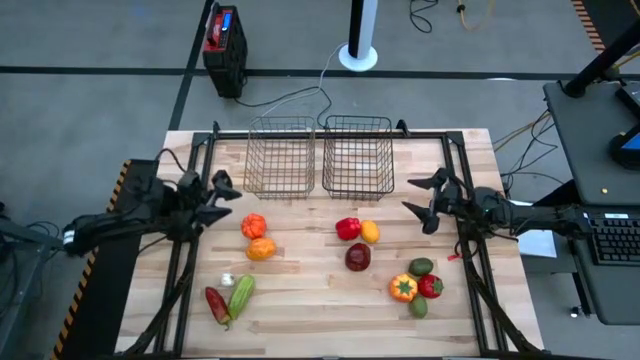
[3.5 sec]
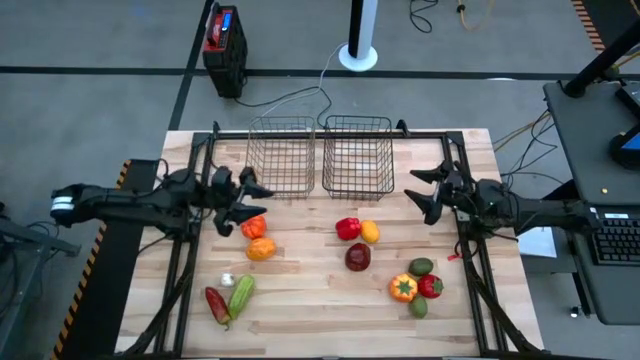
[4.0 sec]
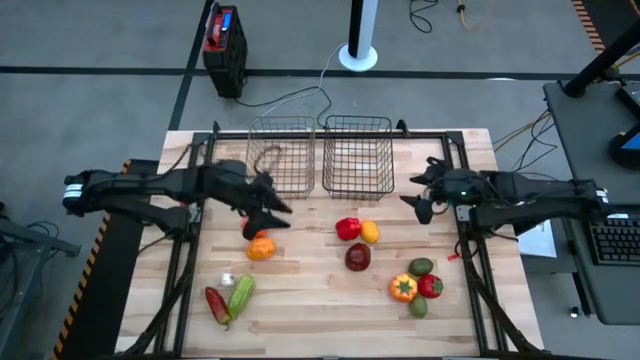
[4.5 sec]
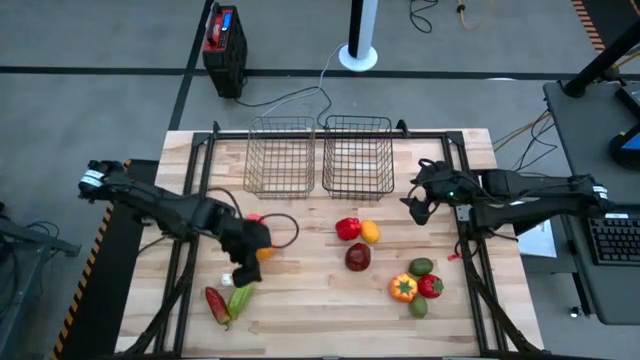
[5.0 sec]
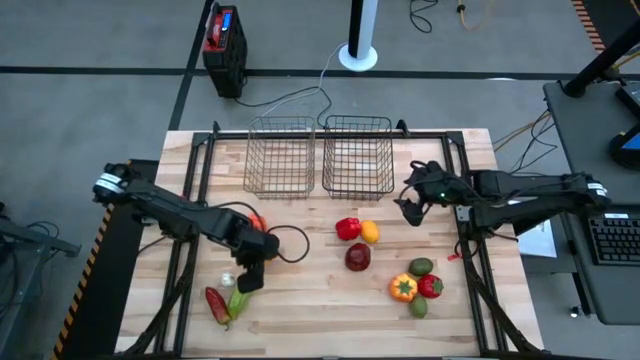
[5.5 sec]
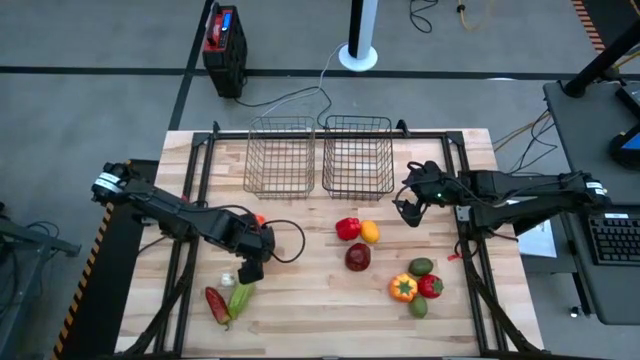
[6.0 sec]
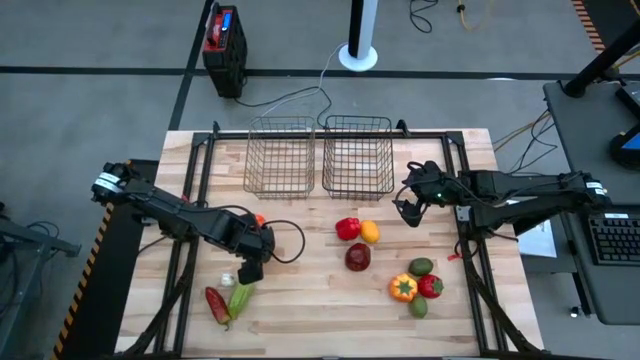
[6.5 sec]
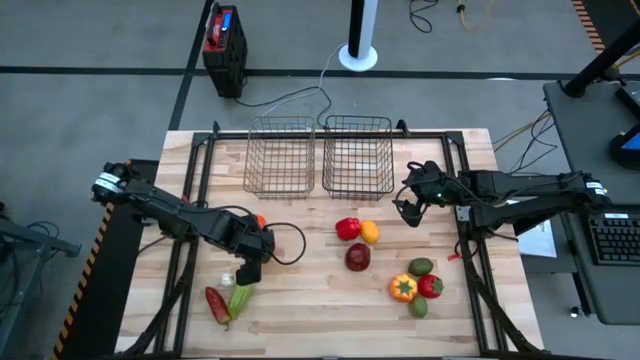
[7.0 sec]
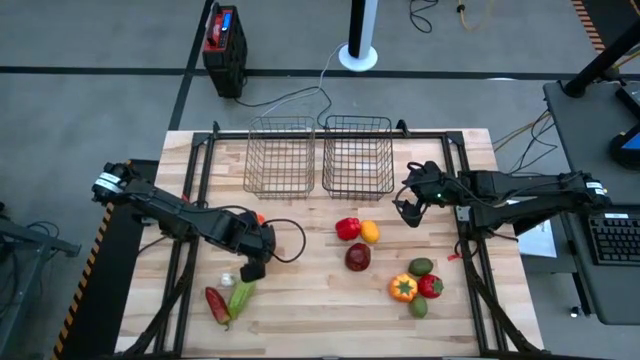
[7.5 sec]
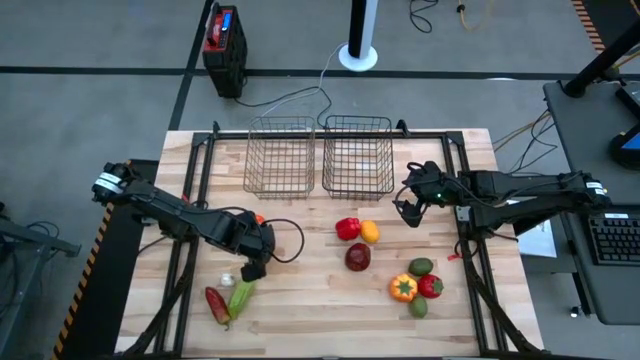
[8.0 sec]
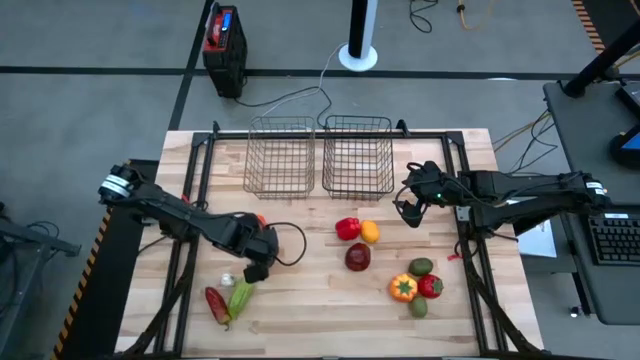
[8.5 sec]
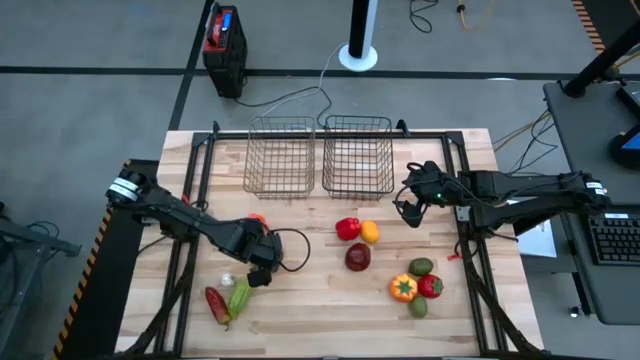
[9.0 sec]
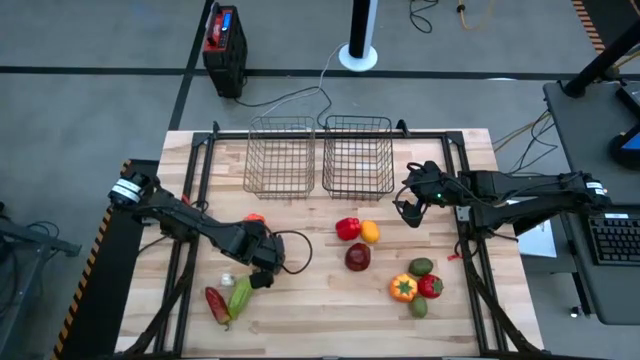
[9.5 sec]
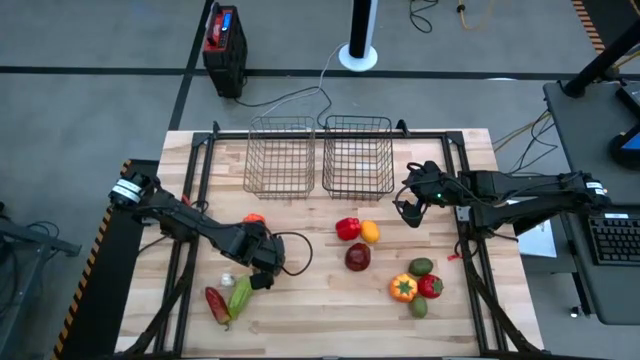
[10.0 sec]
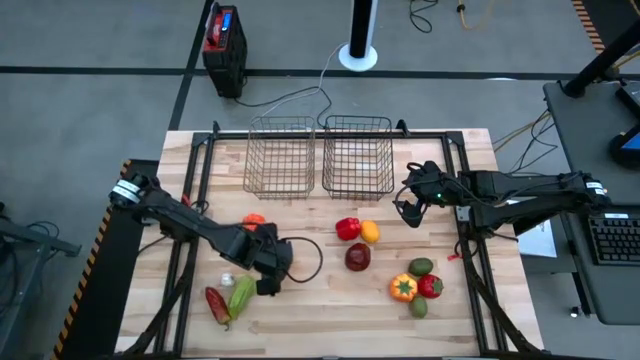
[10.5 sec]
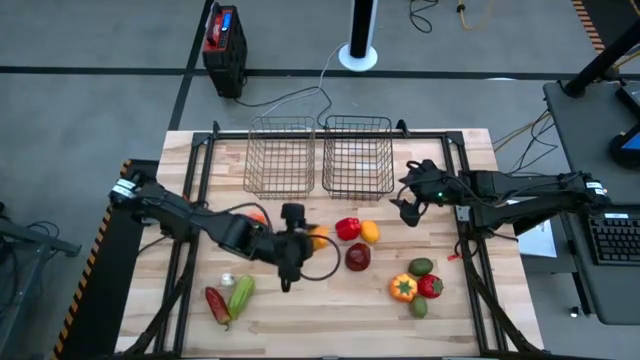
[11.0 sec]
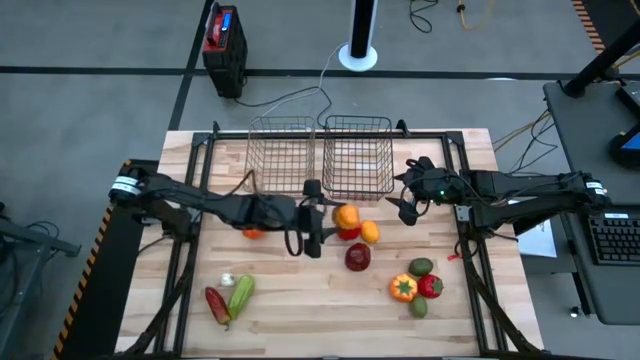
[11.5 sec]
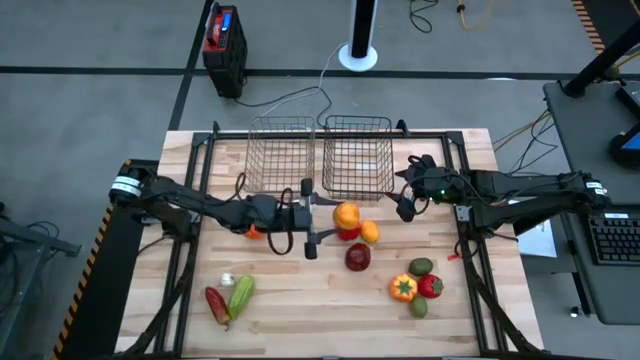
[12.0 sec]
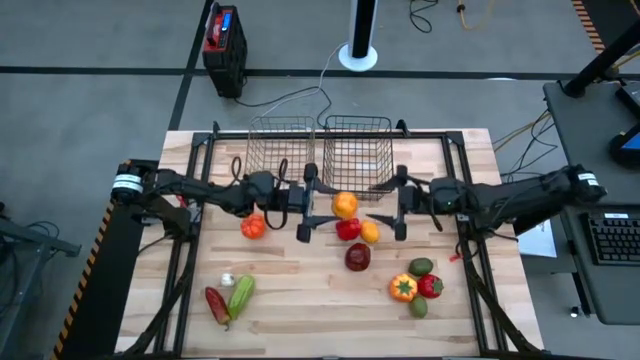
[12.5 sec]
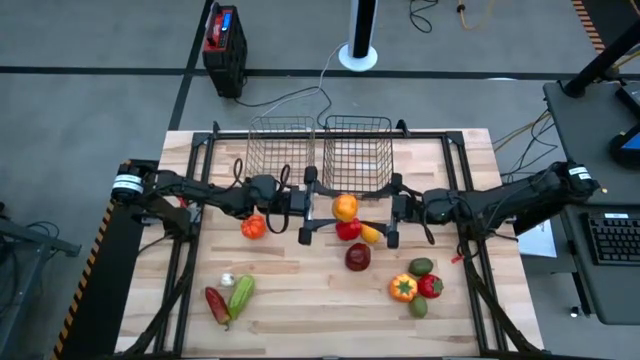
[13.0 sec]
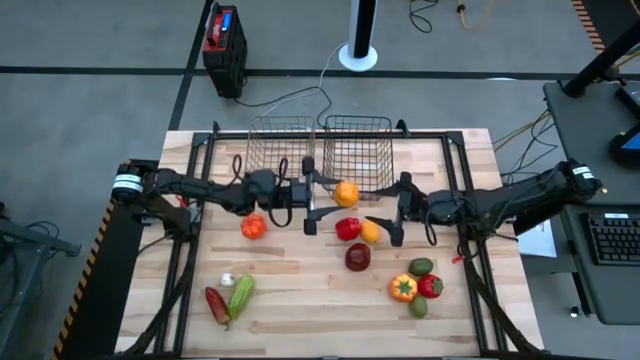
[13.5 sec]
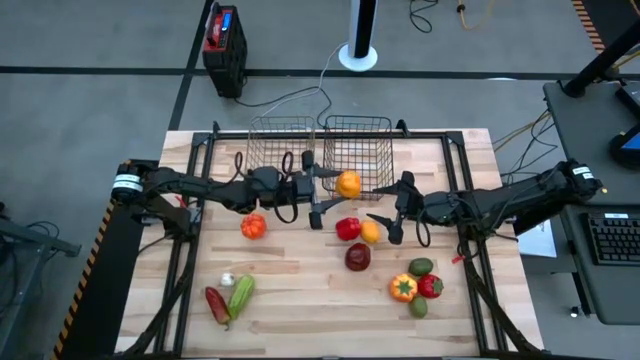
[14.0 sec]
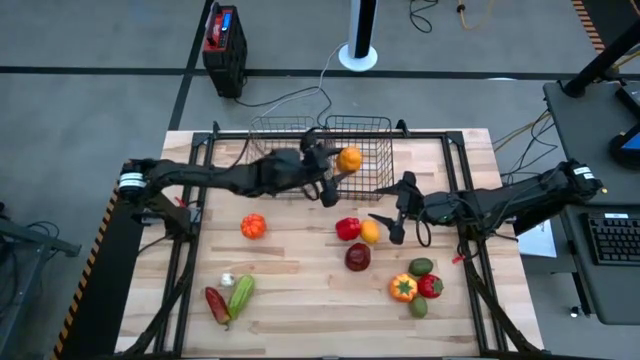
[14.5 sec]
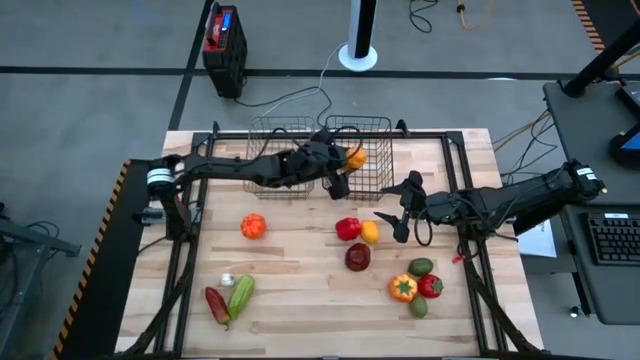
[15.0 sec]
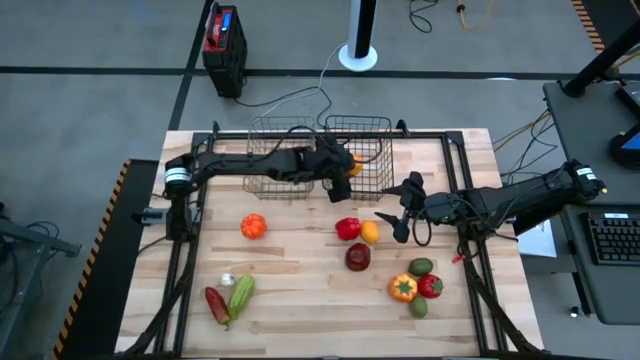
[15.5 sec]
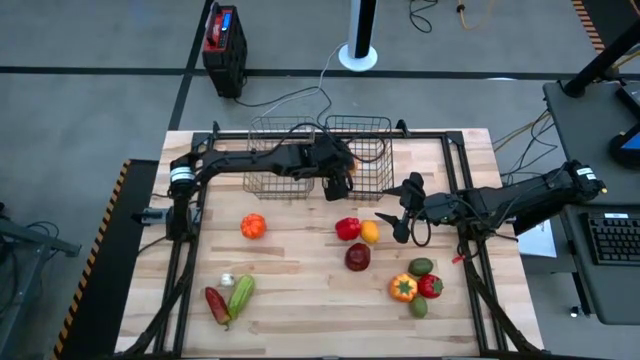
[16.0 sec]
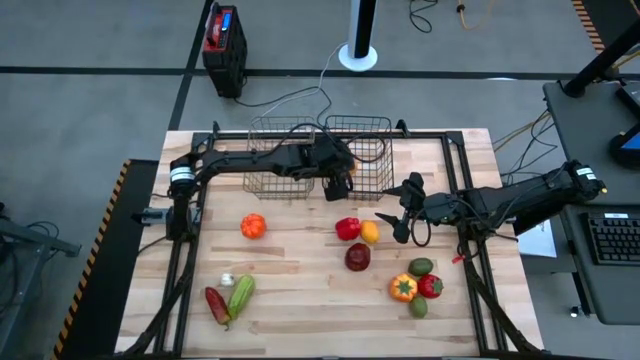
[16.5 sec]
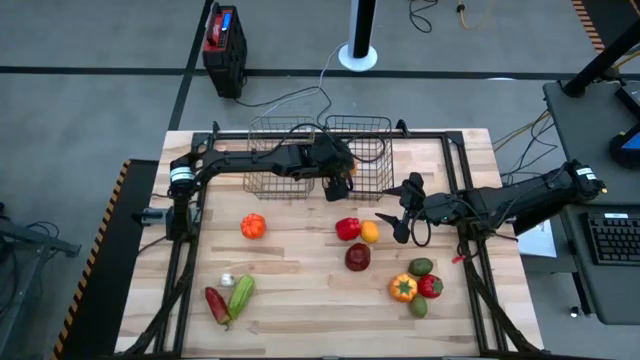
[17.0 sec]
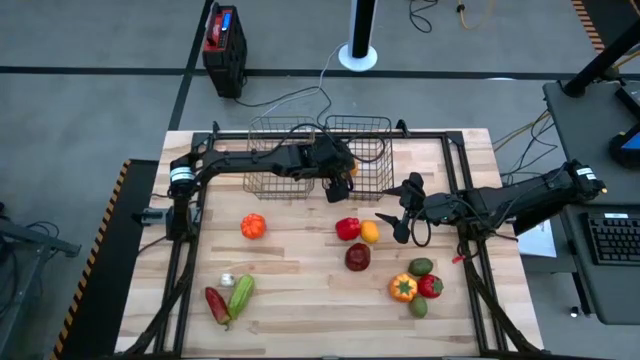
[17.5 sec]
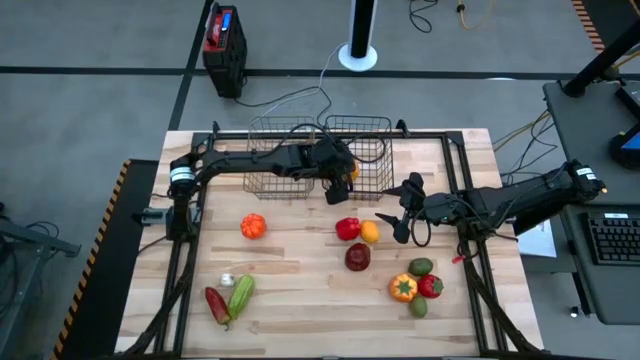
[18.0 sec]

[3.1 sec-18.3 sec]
Task: Sort produce into baskets
Put the brown potato into the black wire basket

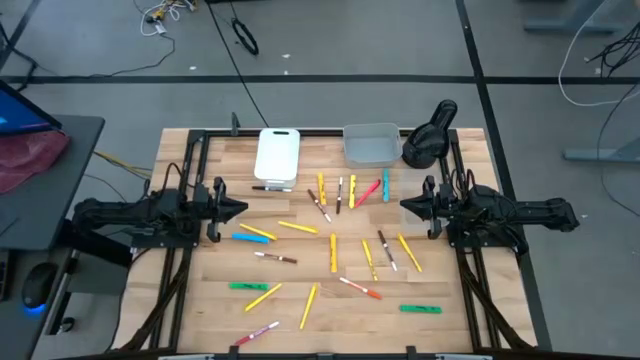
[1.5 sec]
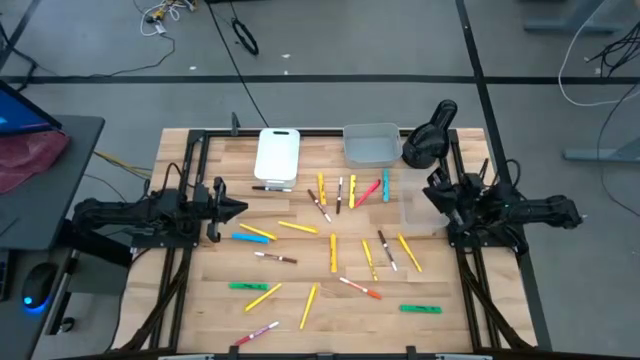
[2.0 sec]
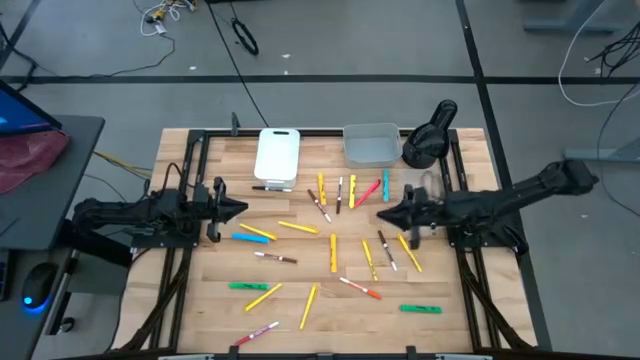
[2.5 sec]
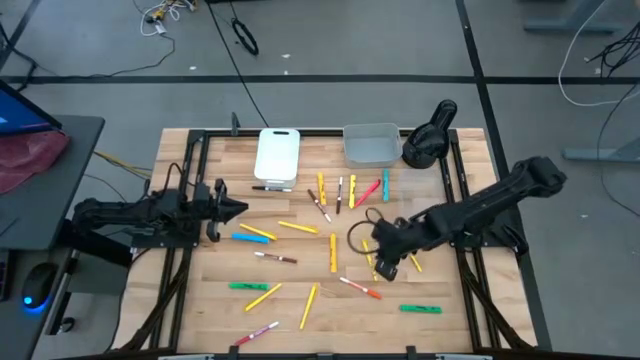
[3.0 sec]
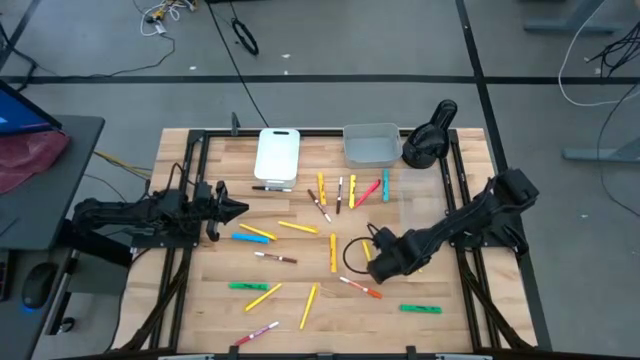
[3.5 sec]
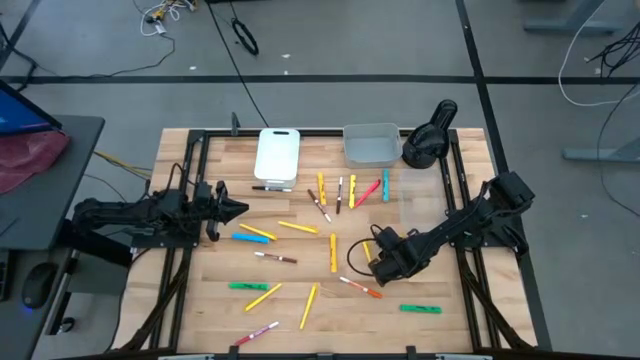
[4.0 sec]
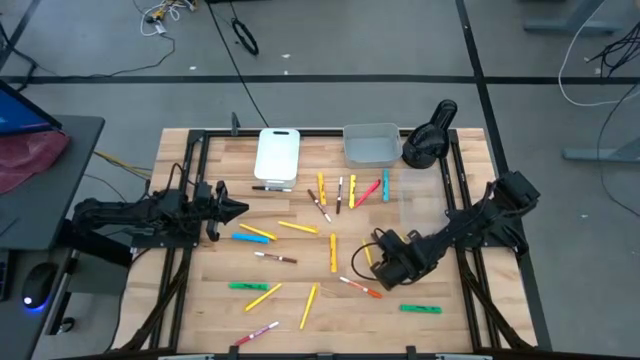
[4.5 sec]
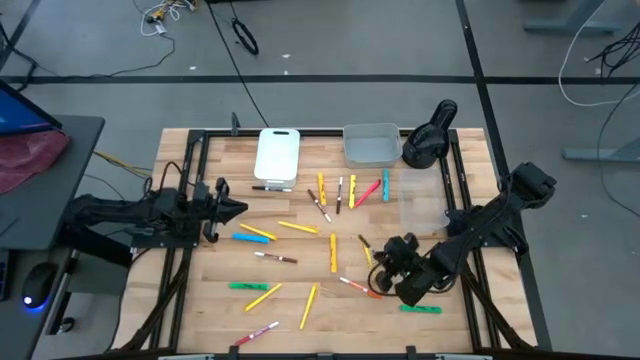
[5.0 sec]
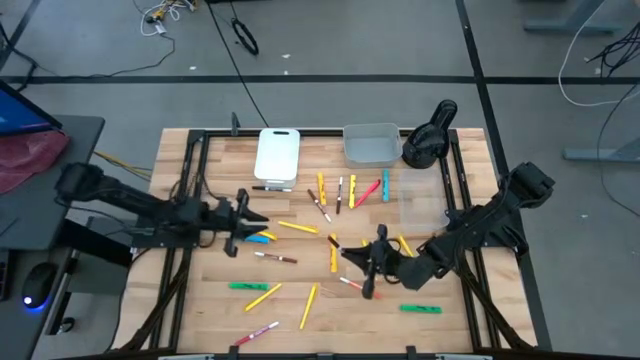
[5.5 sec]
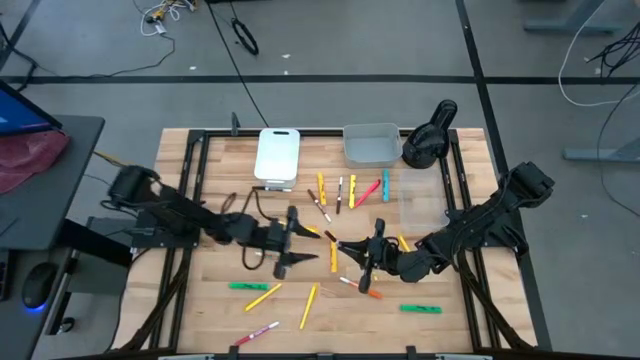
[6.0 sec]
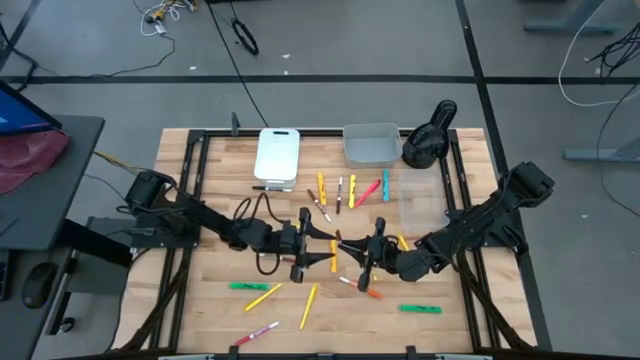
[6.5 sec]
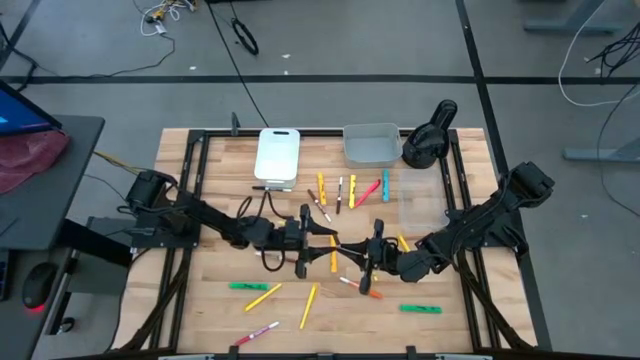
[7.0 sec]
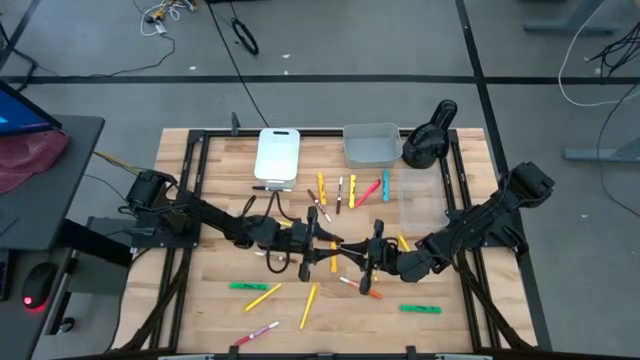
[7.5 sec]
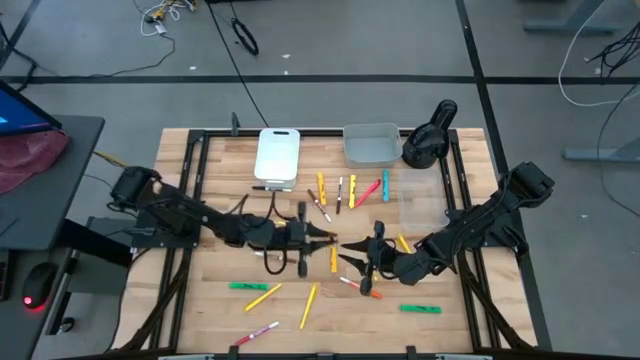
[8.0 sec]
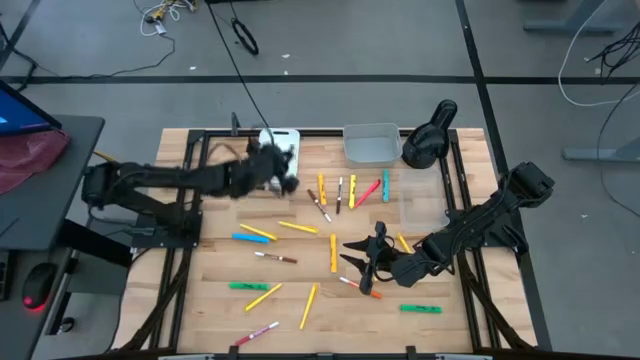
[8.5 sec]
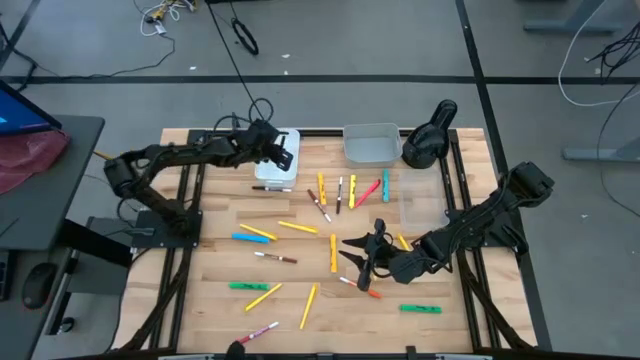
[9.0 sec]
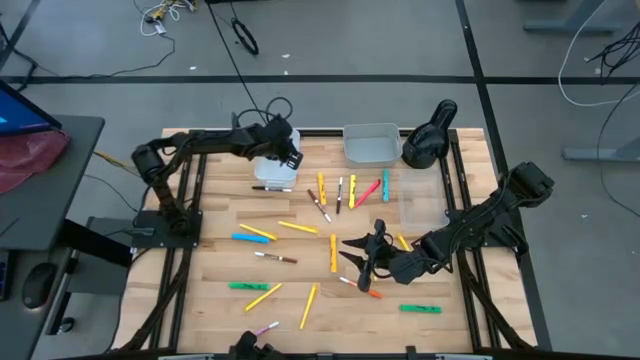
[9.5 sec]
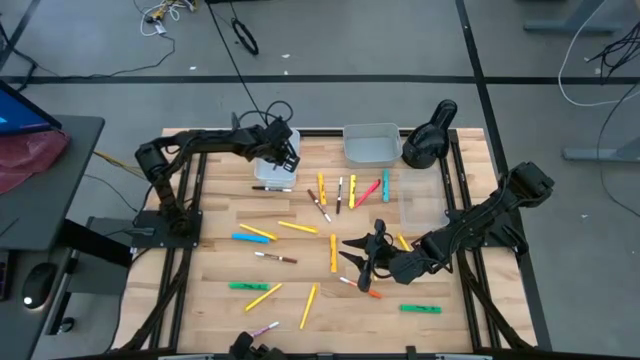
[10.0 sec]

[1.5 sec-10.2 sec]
Task: Pick & Place Markers
Put the brown marker pen into the white bin
